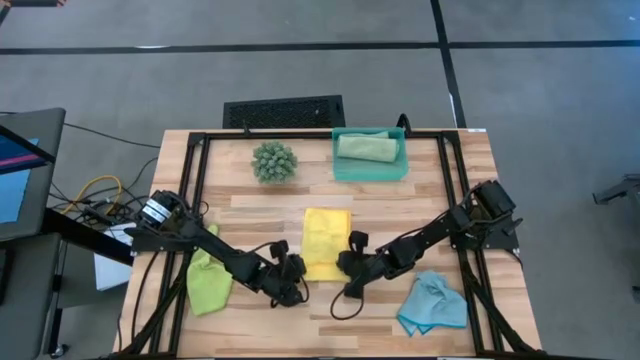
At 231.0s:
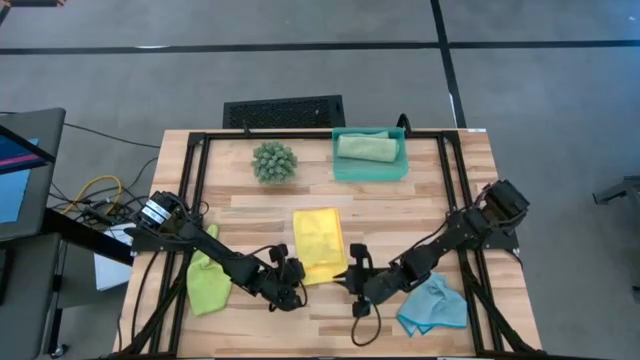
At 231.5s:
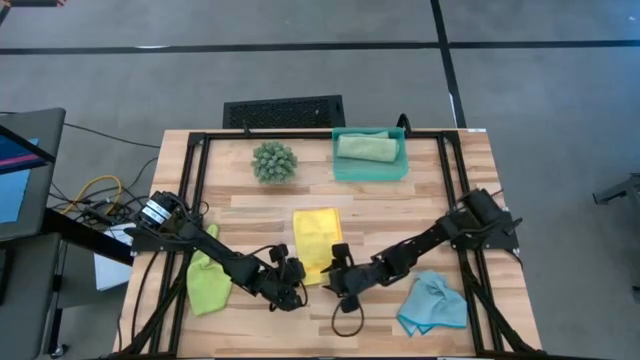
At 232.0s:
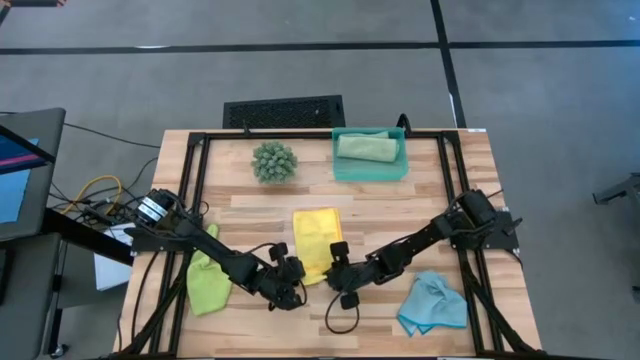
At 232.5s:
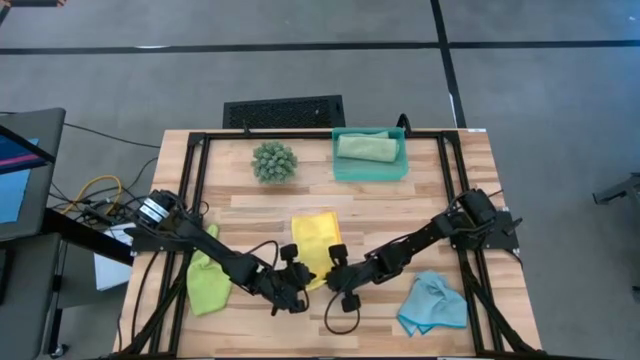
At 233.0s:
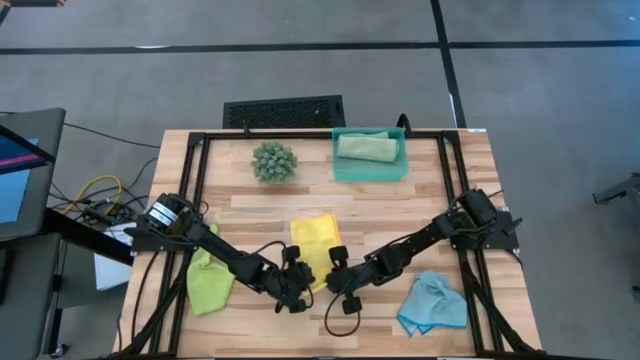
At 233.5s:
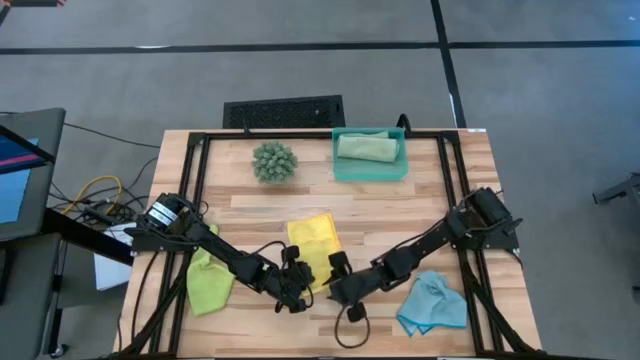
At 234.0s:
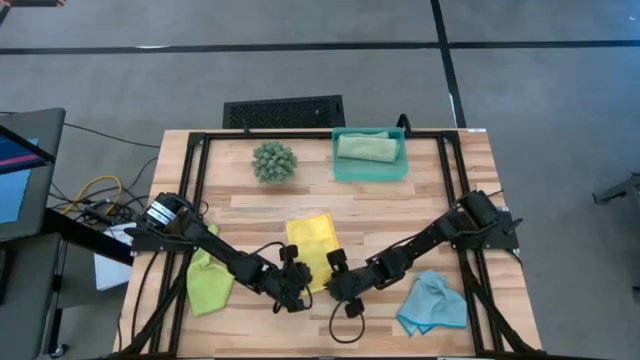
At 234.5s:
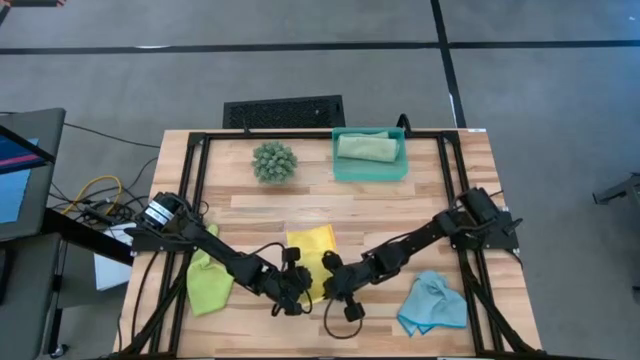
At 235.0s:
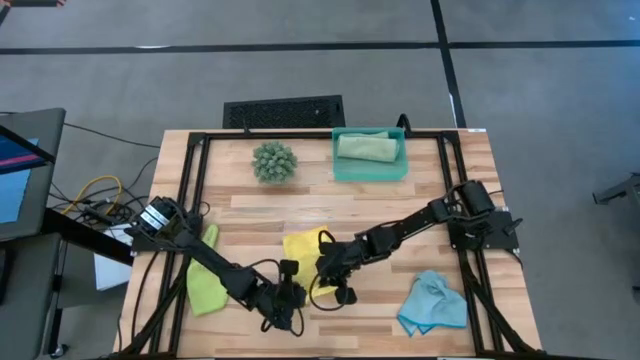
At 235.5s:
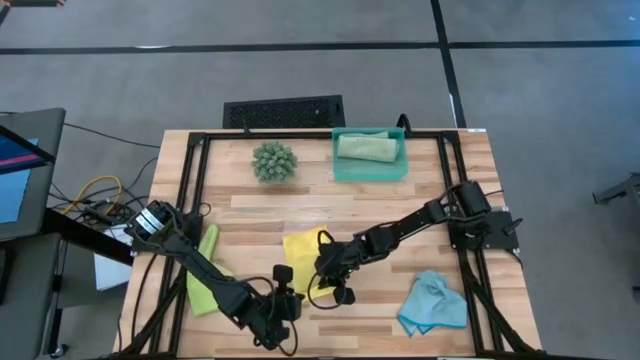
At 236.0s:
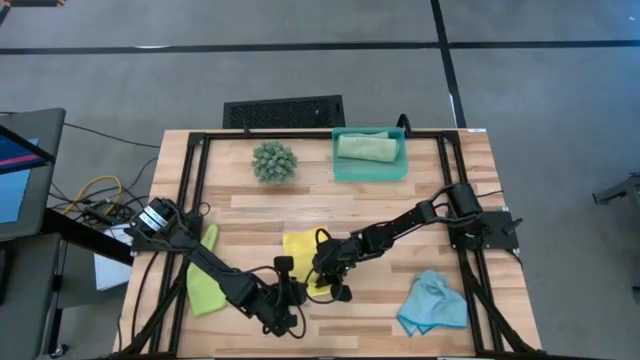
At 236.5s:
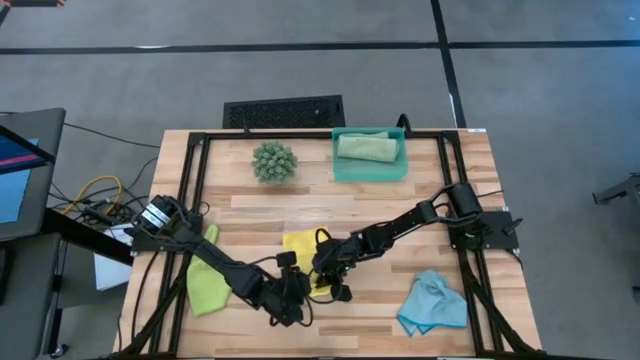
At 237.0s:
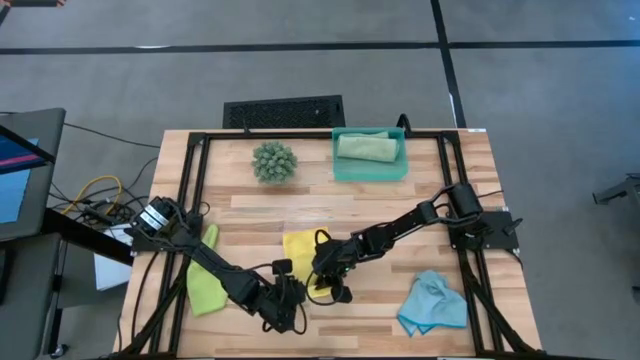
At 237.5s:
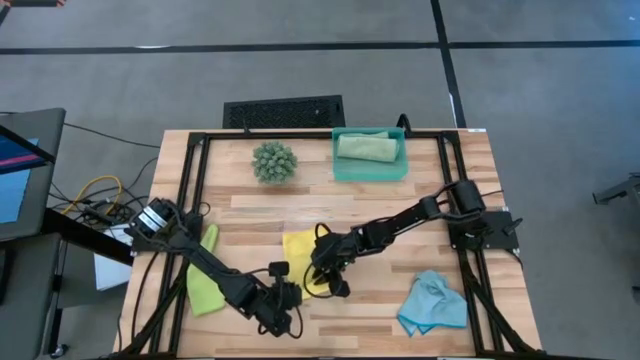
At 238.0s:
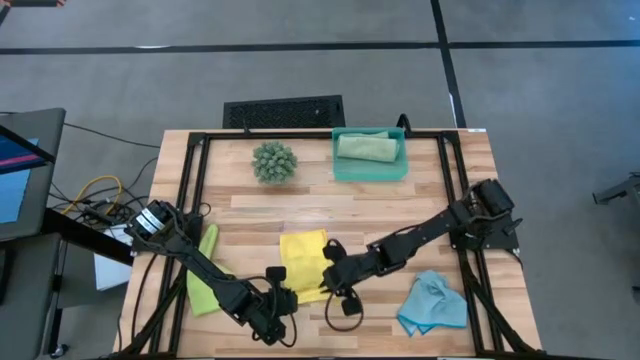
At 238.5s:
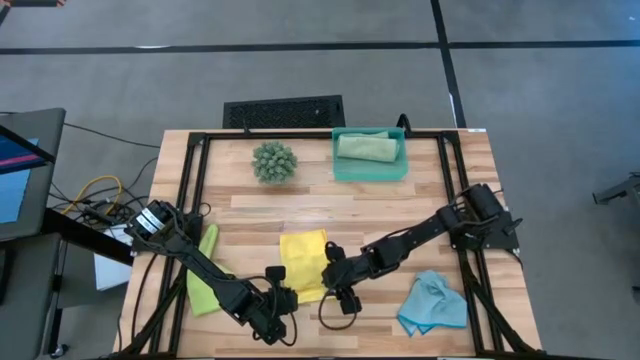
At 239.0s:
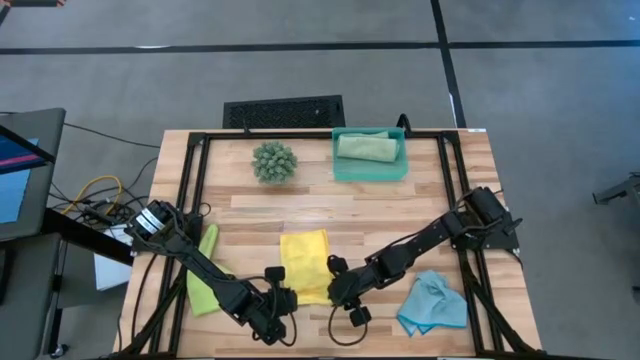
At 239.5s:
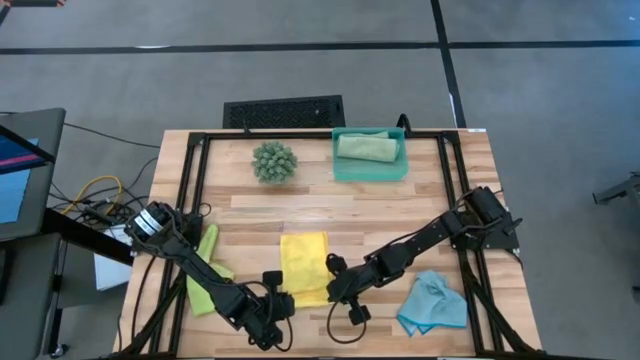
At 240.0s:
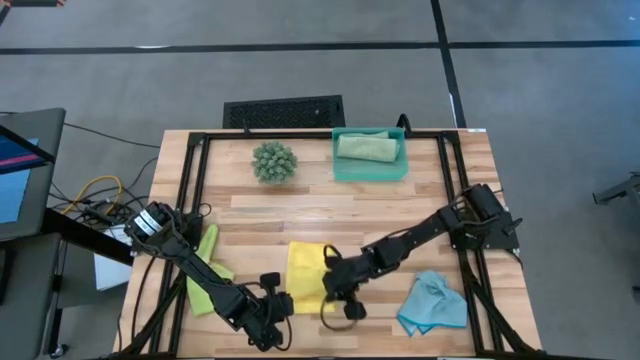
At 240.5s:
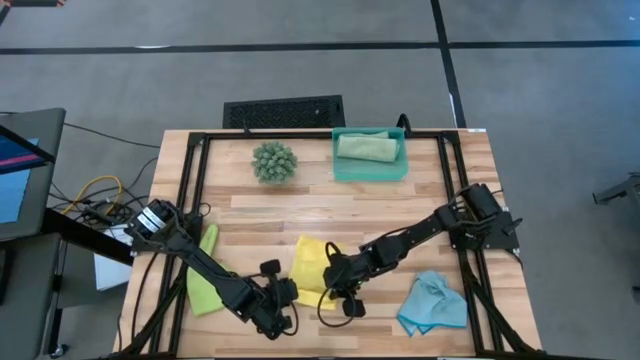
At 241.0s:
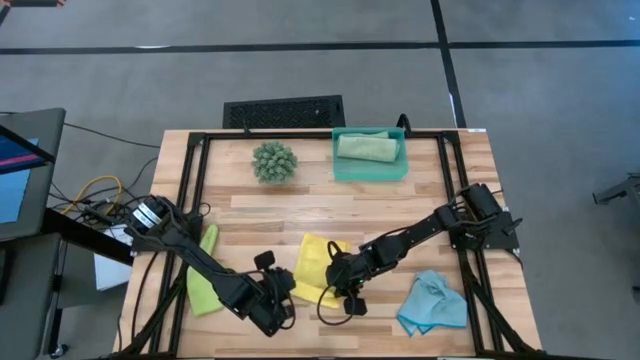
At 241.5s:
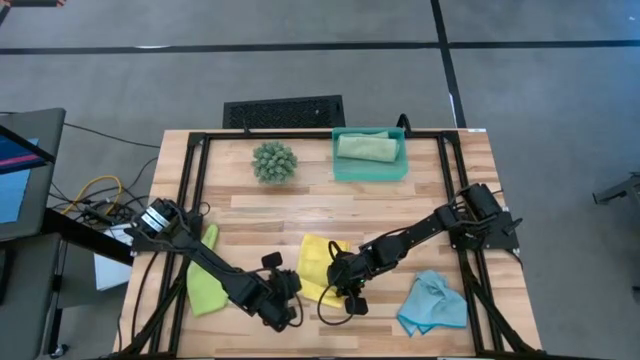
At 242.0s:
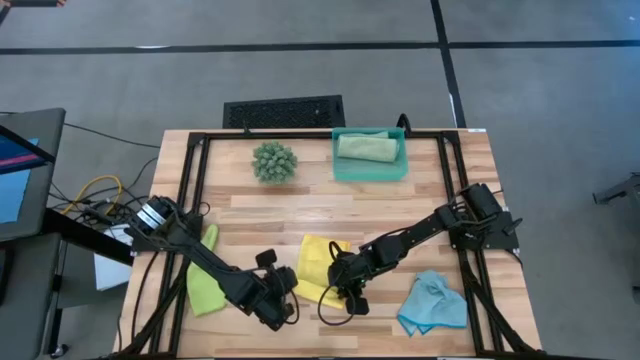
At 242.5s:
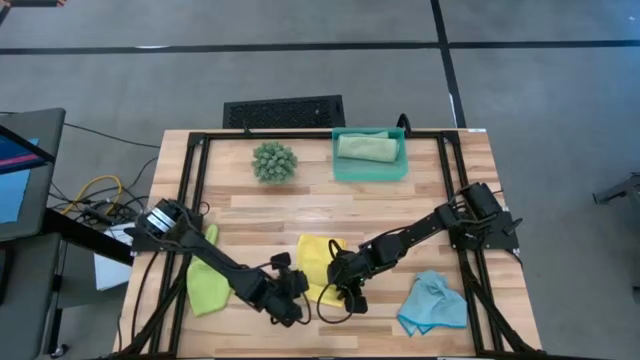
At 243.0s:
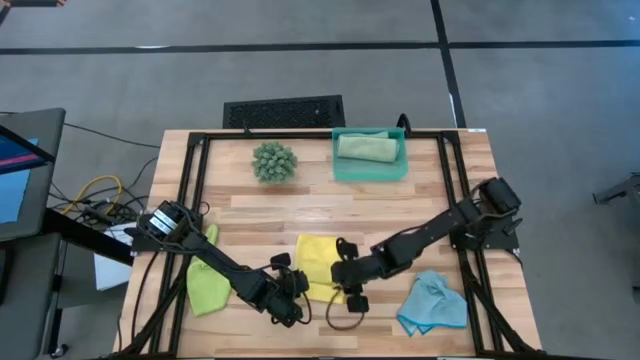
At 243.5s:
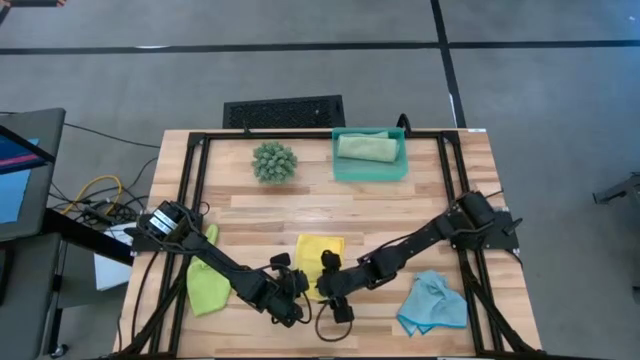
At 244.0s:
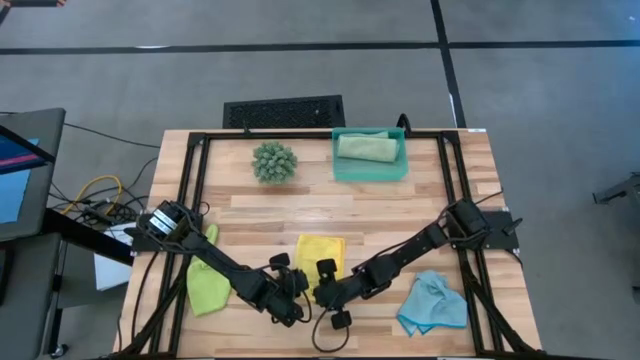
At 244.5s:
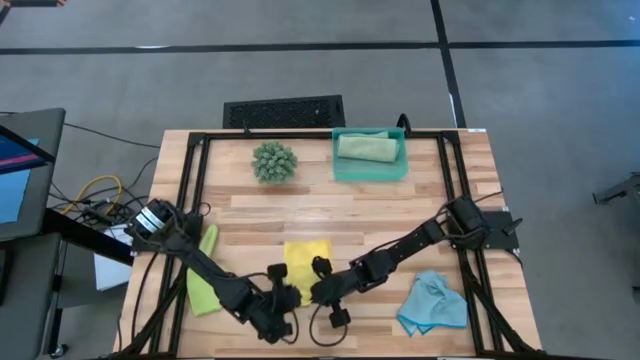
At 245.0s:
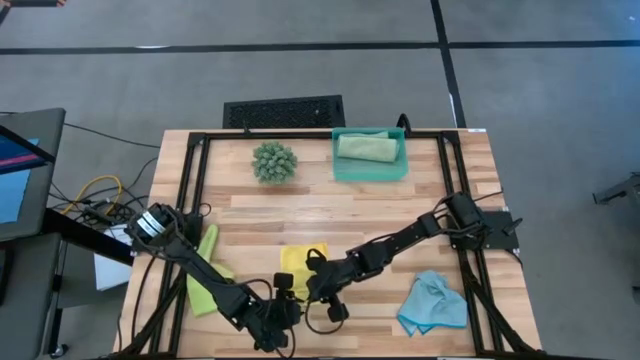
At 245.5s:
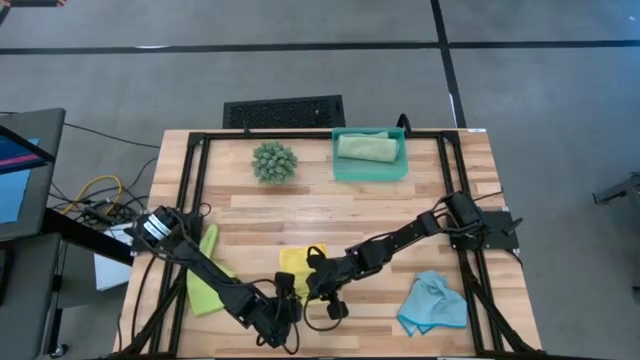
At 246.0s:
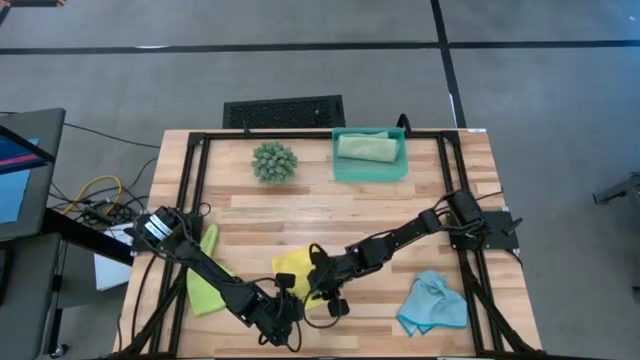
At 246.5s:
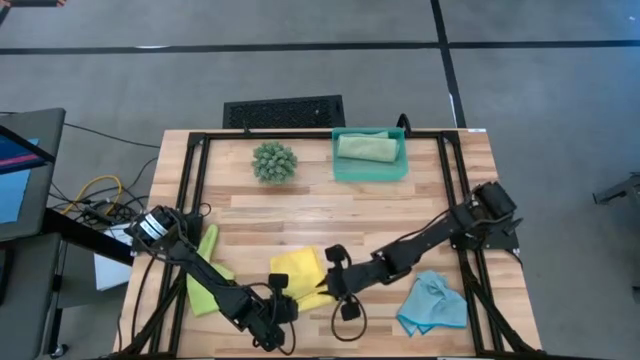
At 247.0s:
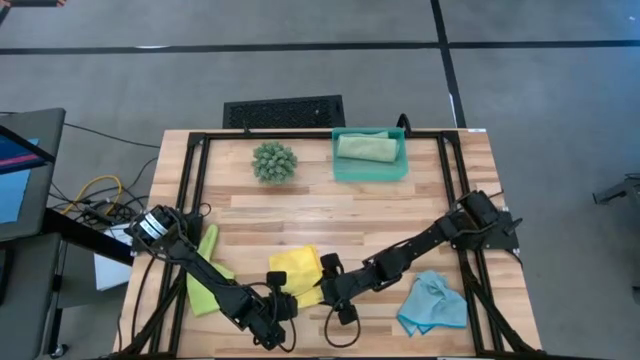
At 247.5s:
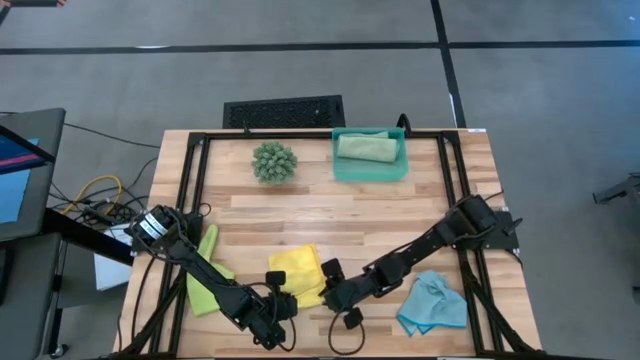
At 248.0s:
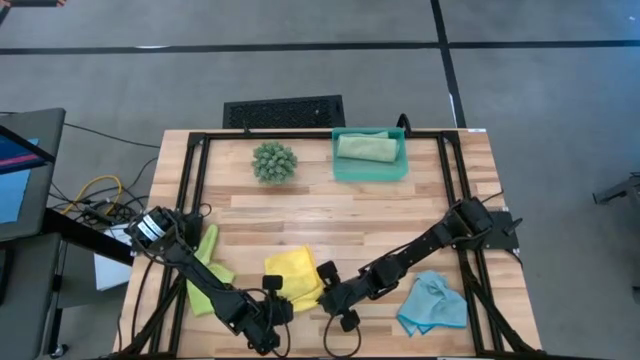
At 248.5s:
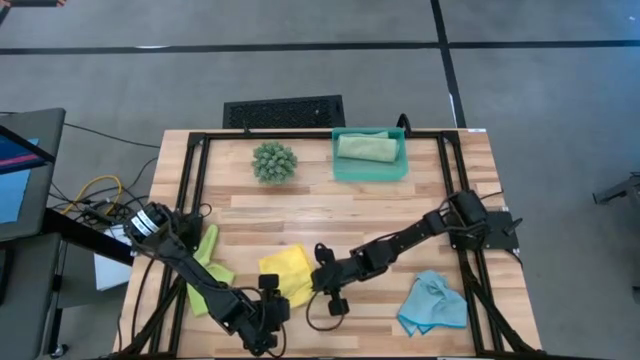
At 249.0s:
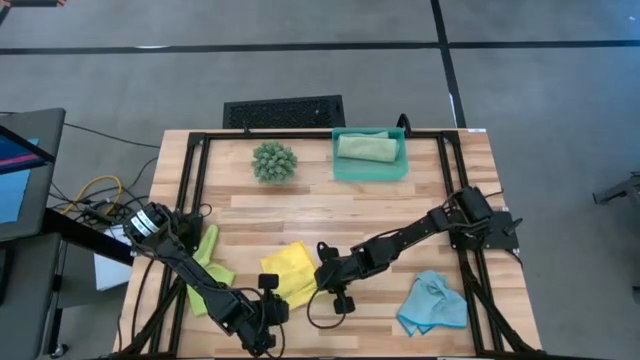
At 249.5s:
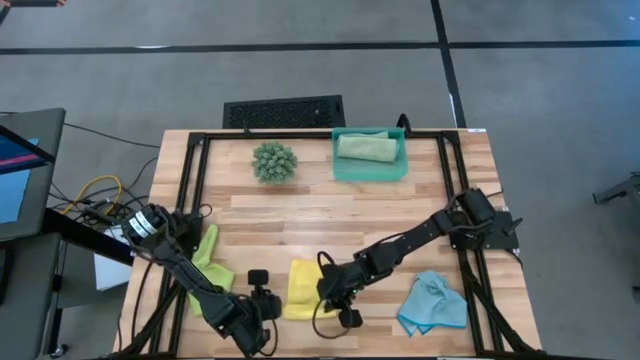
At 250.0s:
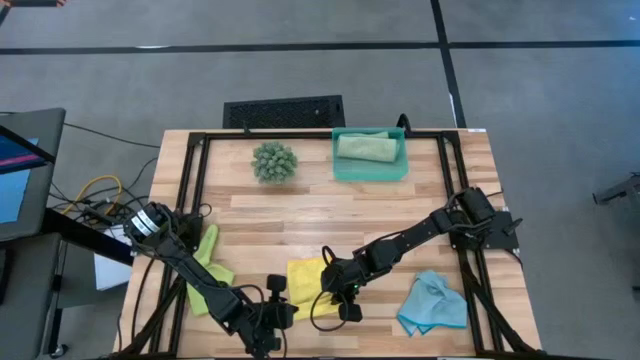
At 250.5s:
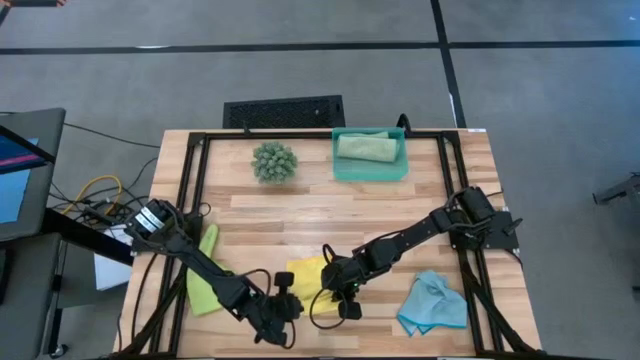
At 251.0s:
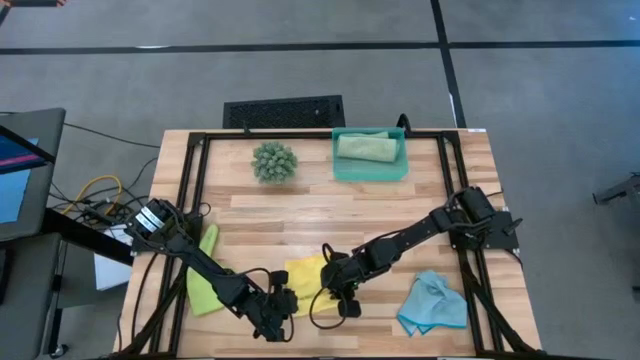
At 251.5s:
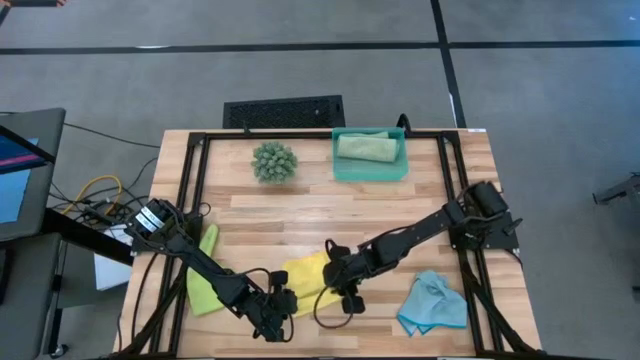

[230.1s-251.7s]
Task: Roll microfiber towels into tight, uniform cylinder then place into a basket
Roll the yellow microfiber cloth
